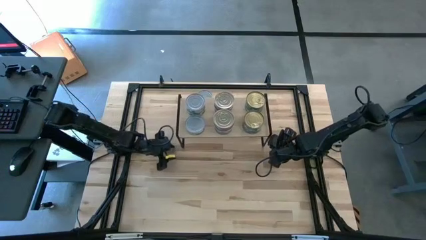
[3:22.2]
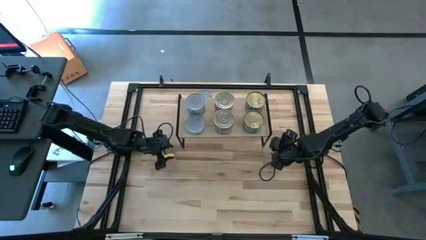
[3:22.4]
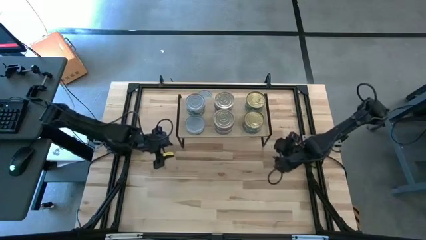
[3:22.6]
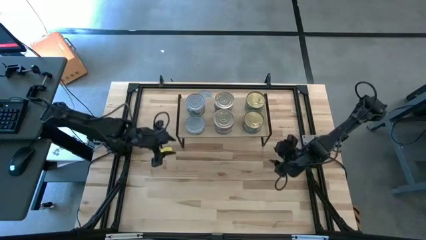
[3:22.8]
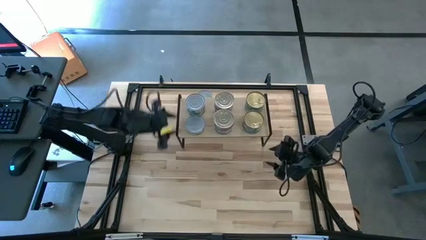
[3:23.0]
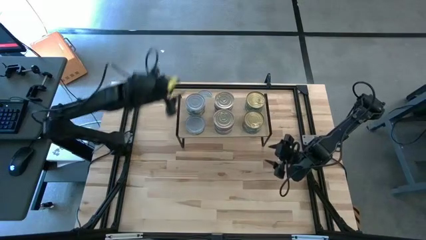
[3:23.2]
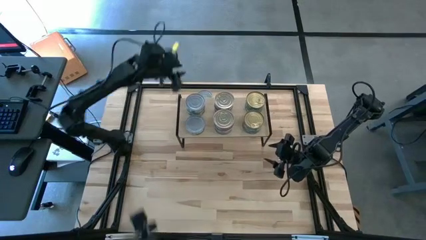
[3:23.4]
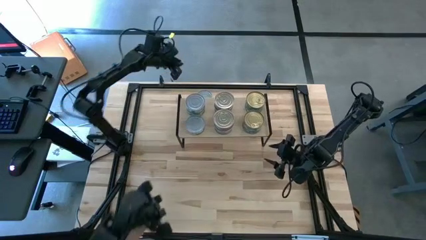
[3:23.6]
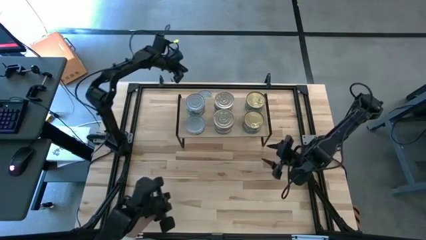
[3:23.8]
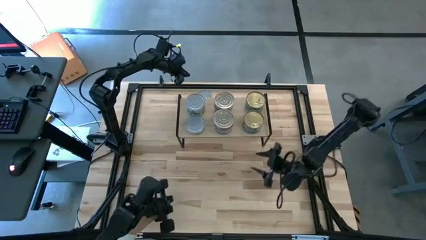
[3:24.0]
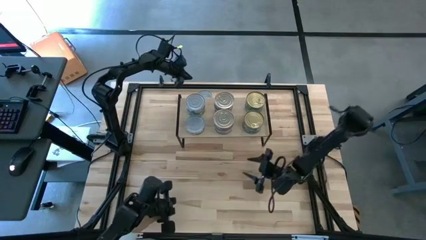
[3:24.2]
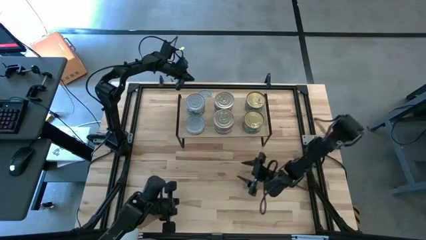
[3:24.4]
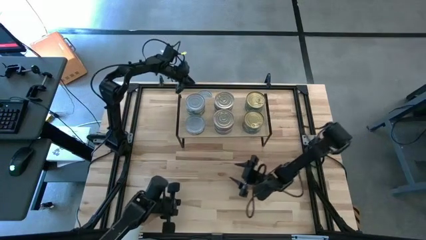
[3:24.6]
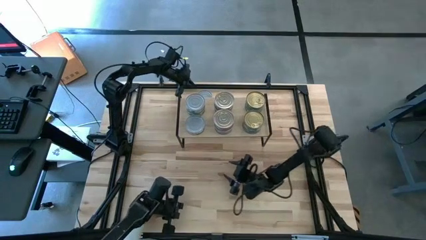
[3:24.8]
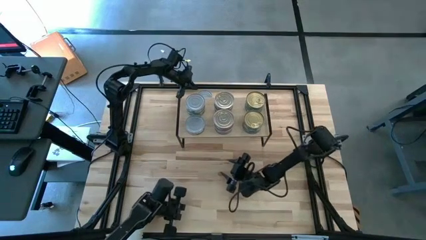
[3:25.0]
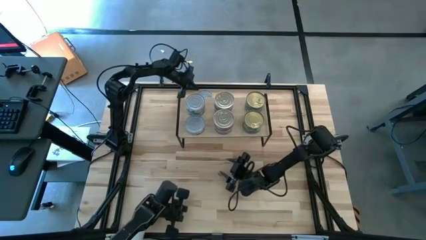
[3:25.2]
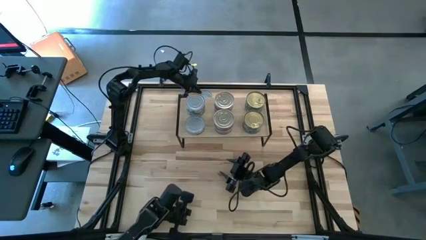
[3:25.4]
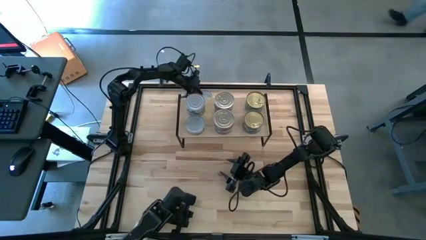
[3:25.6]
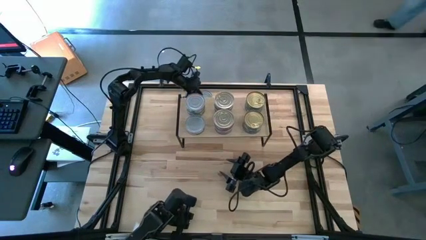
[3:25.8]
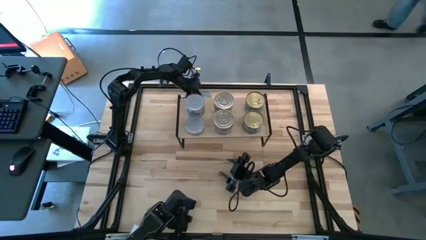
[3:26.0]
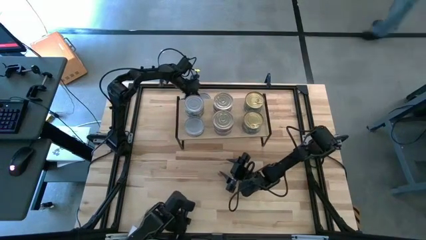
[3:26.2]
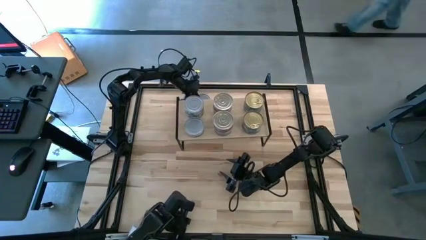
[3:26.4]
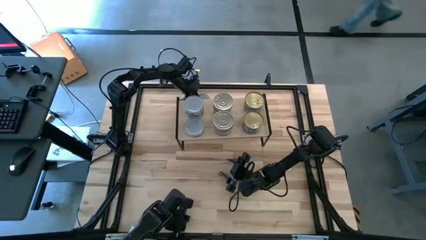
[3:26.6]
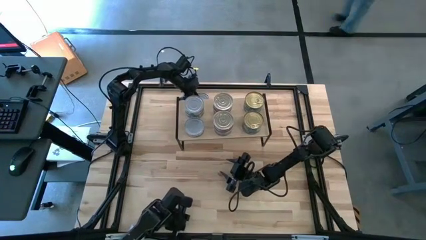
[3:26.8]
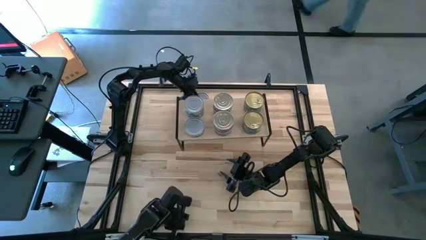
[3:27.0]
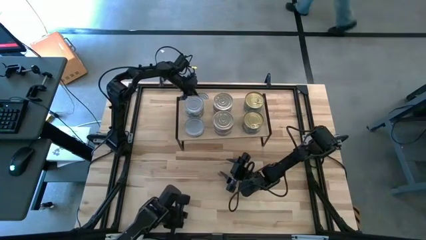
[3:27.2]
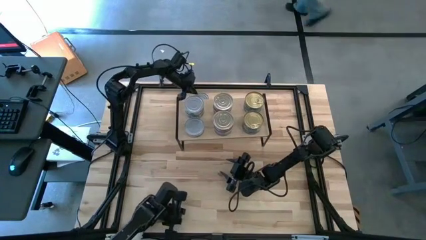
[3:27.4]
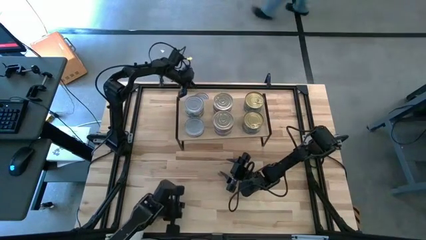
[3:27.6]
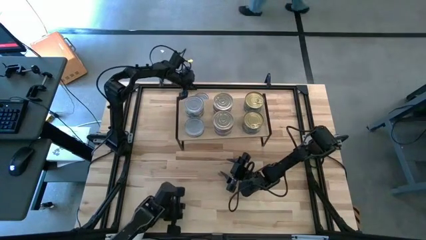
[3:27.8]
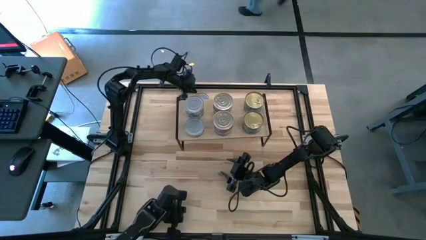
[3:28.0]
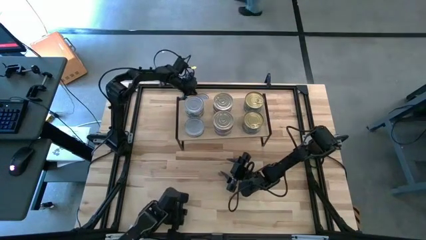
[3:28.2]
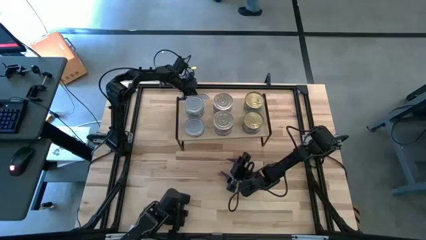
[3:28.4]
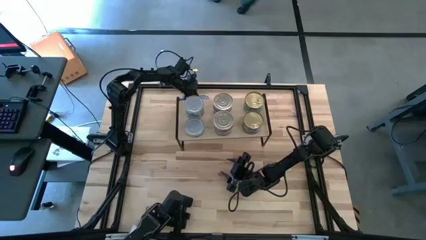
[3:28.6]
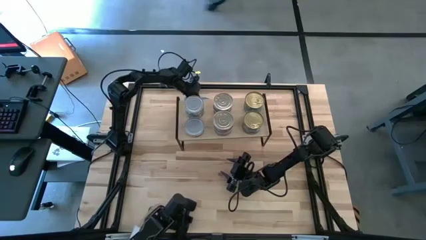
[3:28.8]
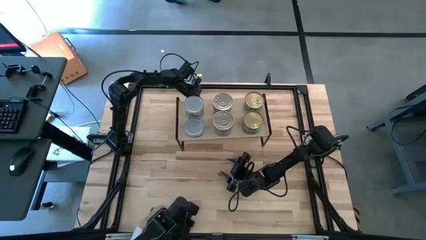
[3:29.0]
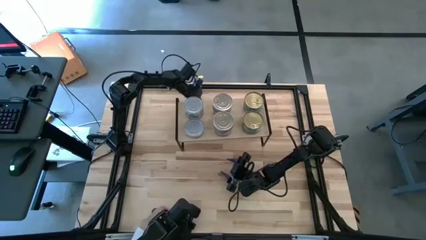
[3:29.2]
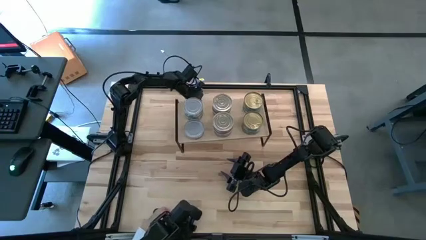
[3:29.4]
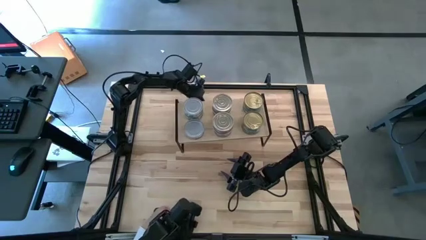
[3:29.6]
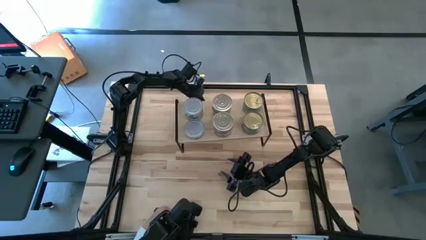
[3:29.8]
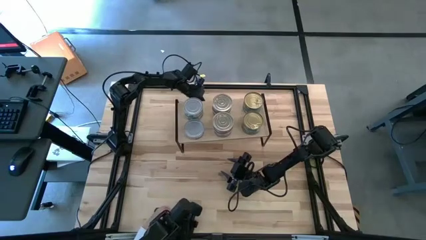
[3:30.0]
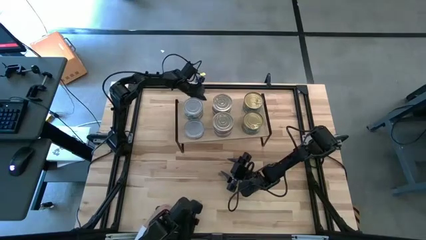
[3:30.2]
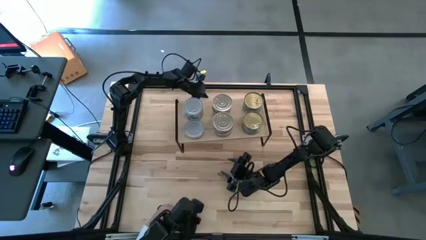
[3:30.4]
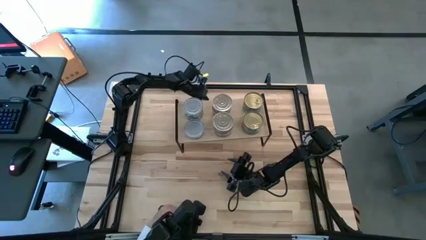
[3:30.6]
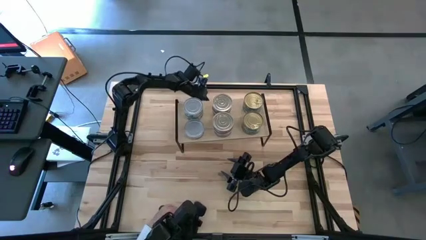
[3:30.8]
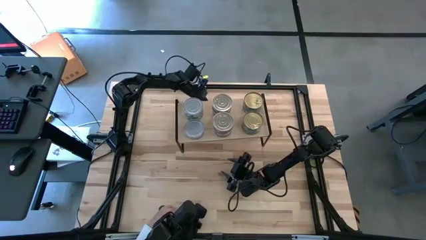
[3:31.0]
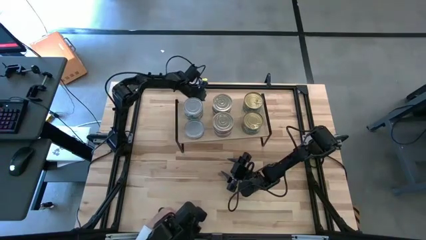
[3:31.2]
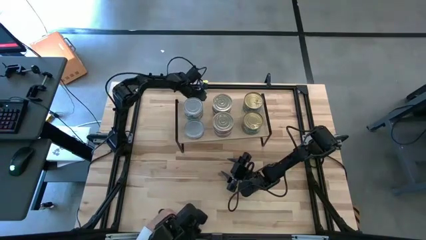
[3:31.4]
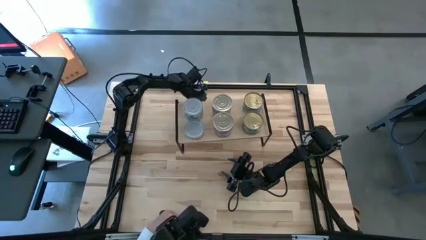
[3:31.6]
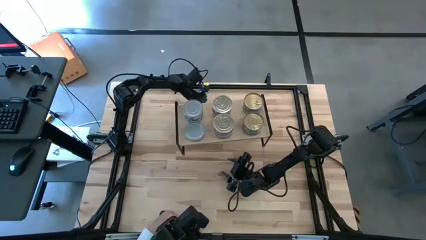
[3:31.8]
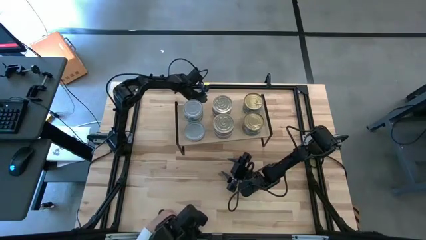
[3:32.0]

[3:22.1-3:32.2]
Task: Stack canned seafood by type on shelf
Adjust the green white tuna can

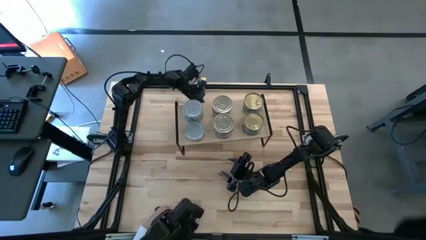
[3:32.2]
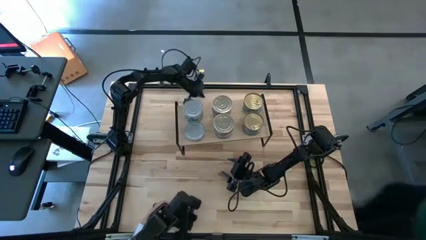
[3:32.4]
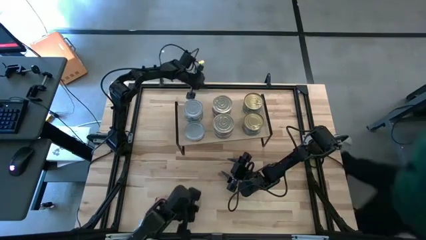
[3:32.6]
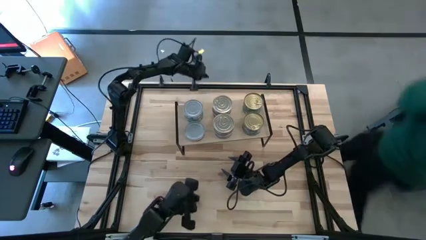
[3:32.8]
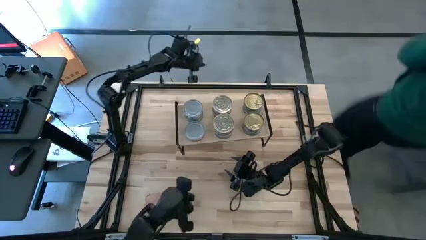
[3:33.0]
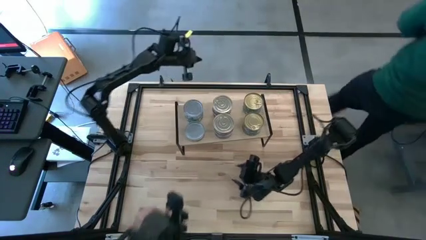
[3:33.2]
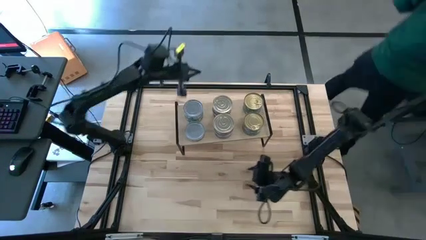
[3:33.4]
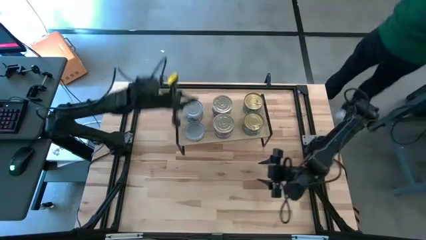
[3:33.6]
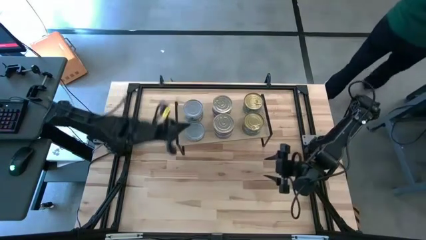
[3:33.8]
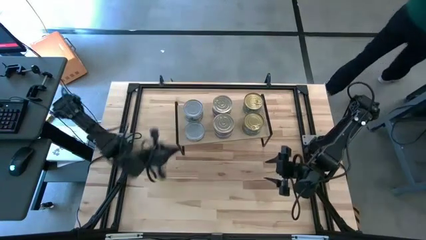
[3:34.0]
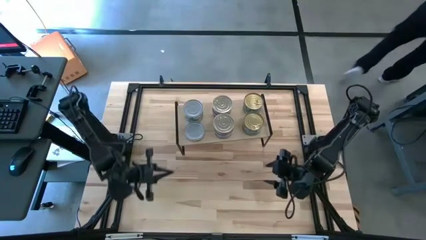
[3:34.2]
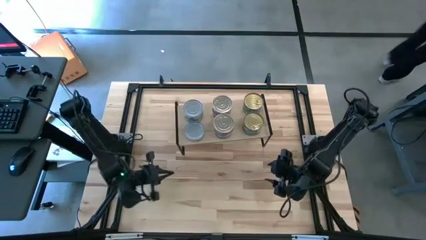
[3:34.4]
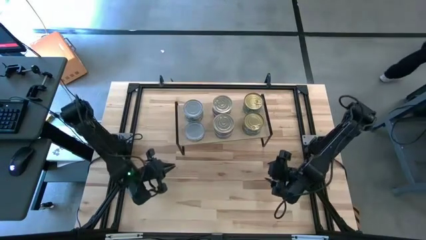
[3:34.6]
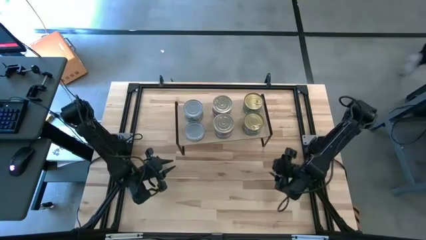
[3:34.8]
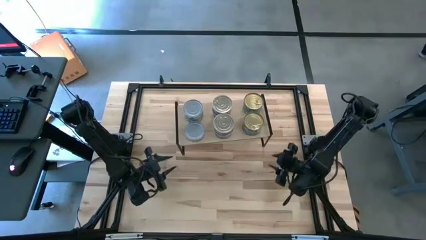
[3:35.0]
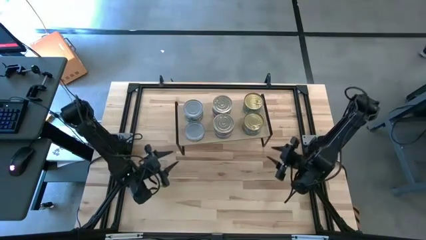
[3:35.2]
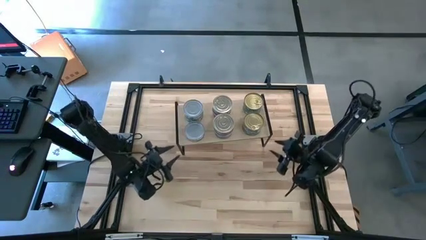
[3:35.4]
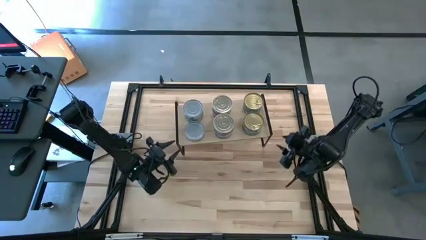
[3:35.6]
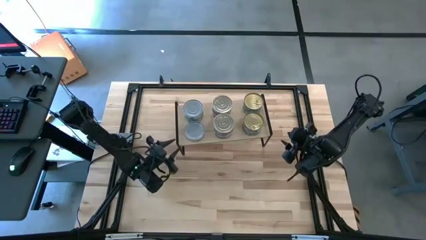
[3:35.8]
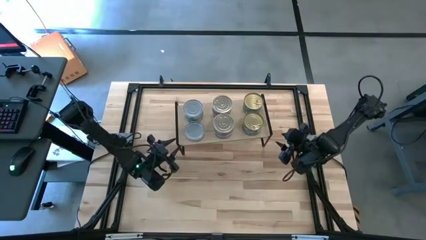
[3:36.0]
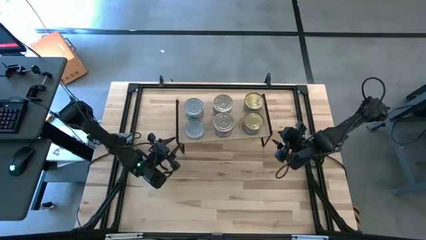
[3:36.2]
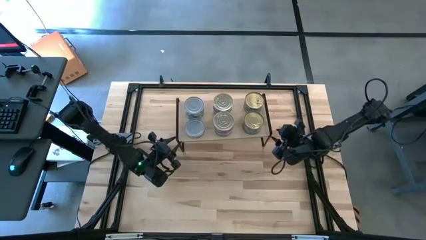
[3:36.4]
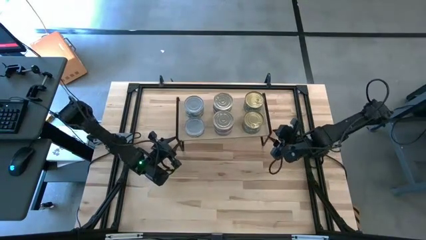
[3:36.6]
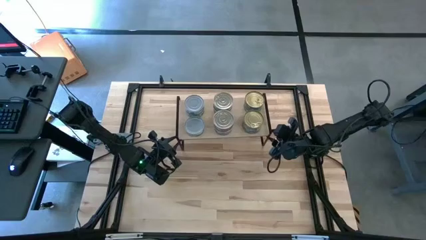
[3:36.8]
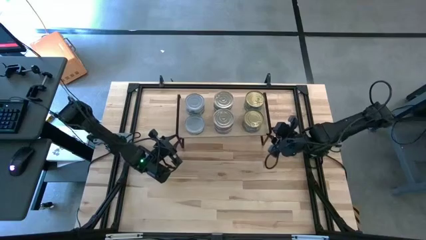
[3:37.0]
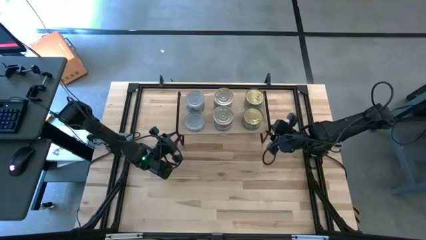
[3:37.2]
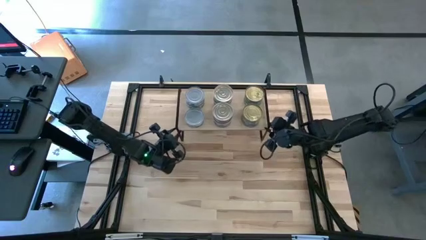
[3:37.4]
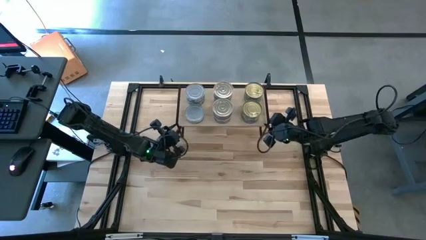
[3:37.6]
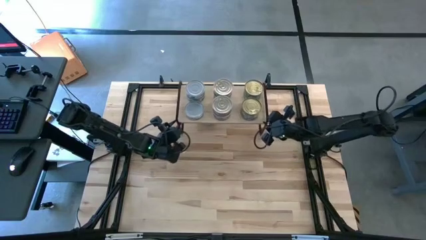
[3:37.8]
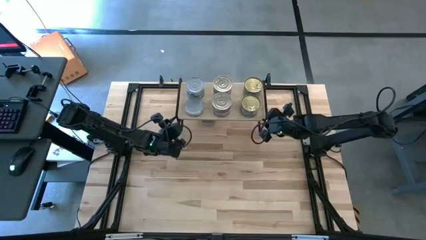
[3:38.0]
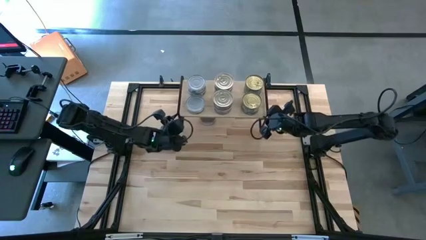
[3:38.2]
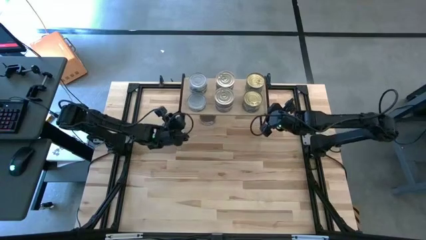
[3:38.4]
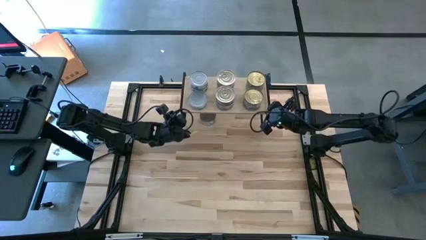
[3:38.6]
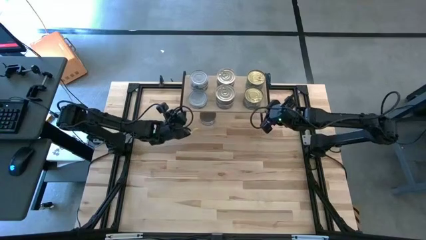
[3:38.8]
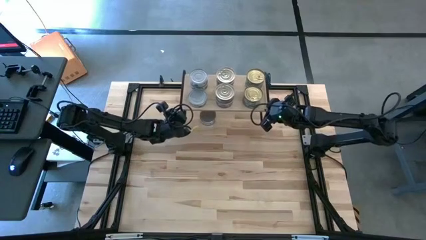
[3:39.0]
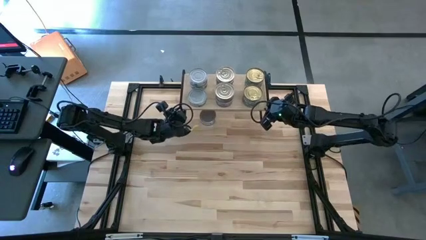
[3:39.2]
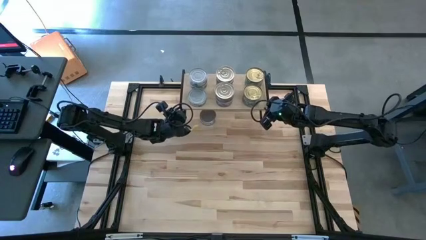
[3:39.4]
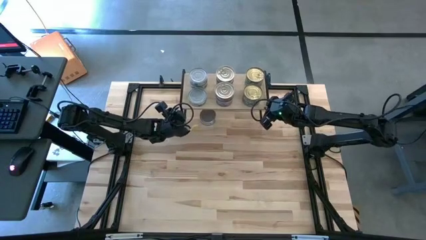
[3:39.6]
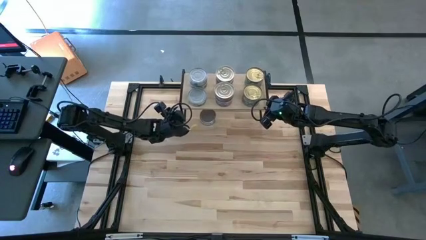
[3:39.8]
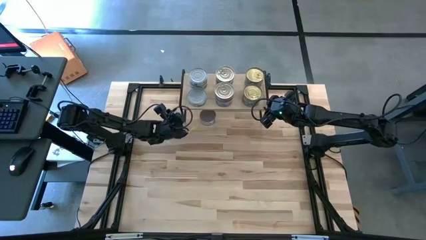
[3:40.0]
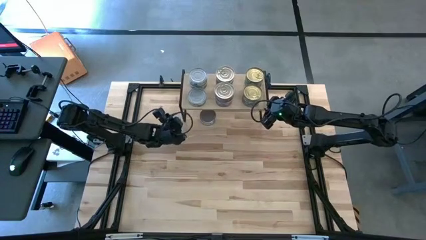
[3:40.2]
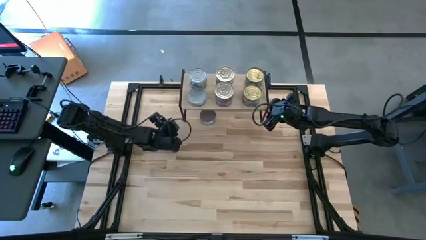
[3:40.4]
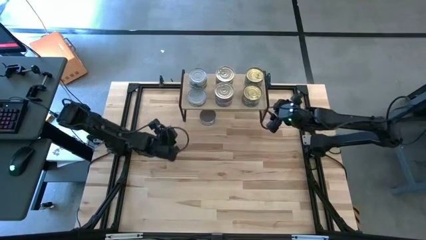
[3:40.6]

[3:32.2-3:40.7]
Adjust the shelf
